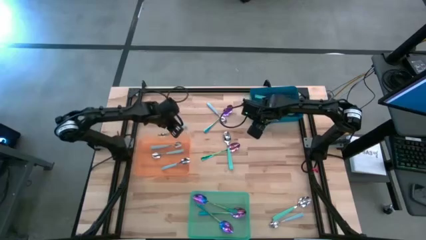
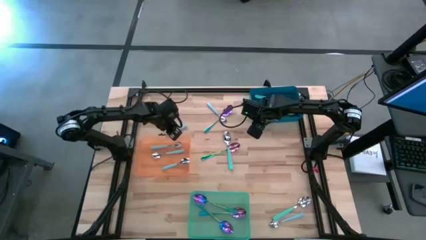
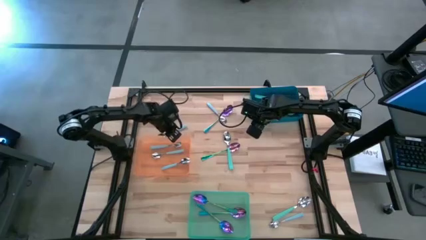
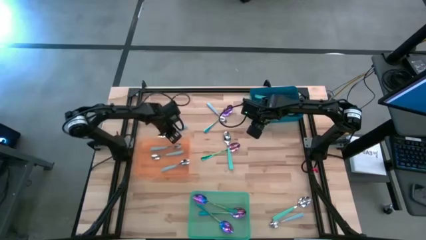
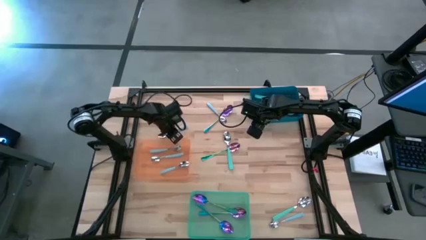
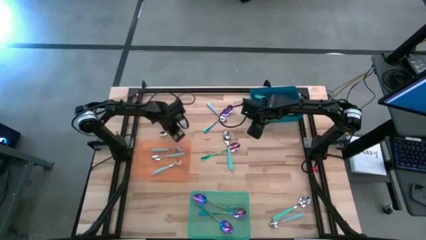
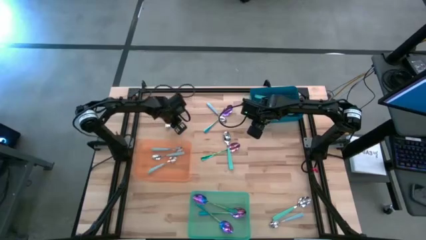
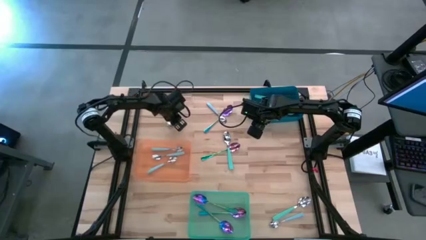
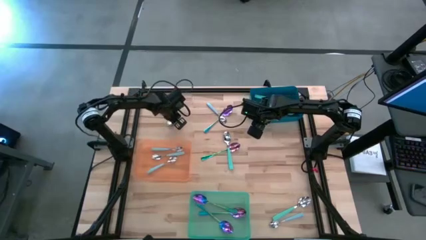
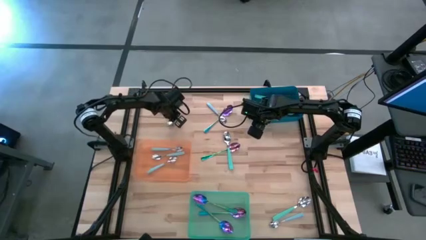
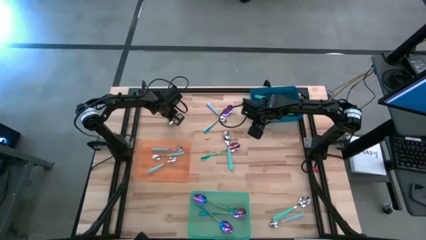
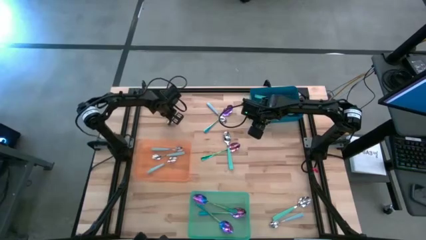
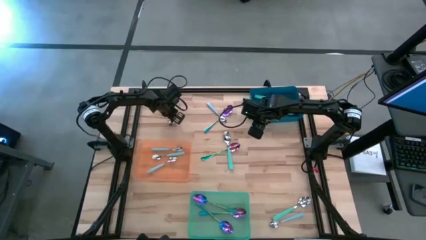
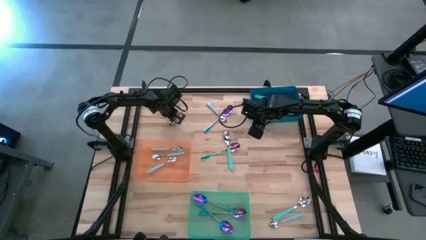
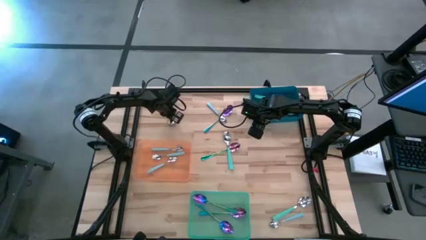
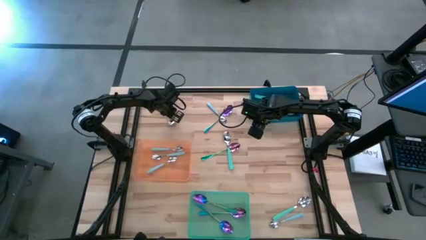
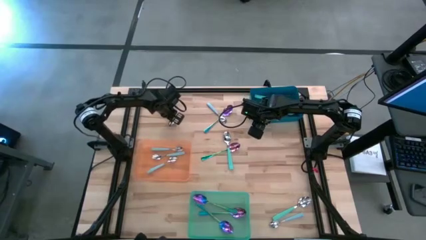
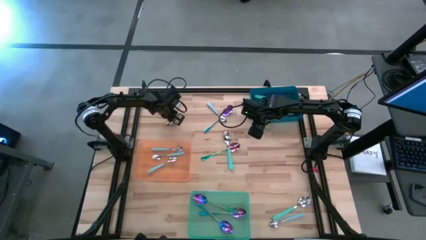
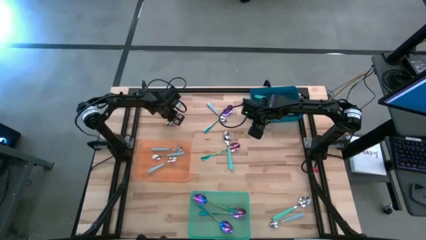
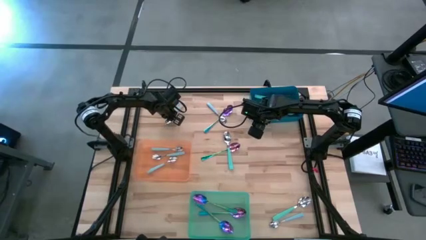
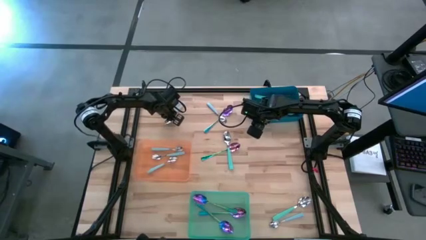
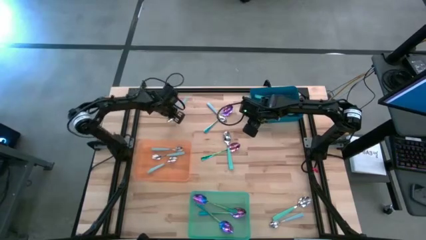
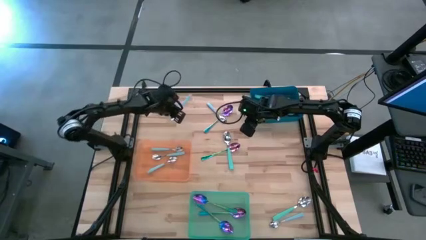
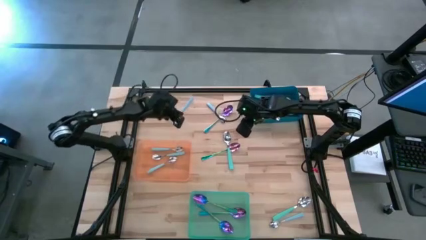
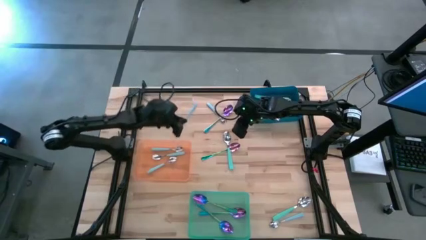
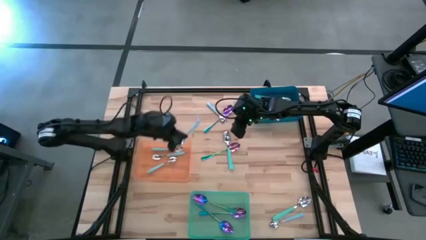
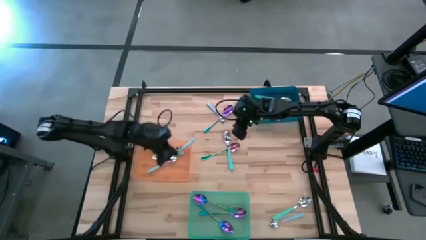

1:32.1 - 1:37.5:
Task: Sort silverware by color (type)
Put the top left blue spoon into the orange bin

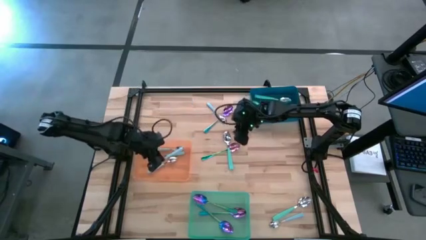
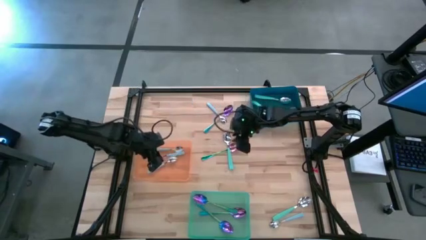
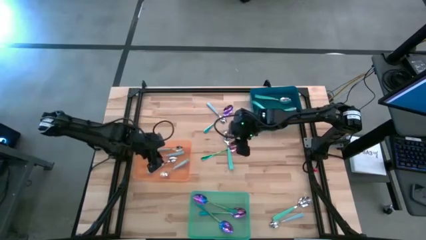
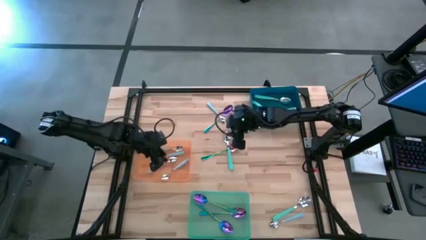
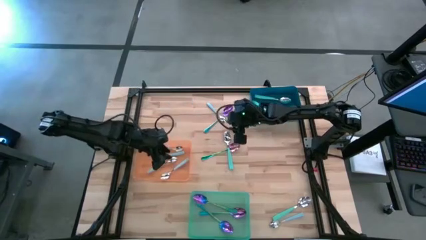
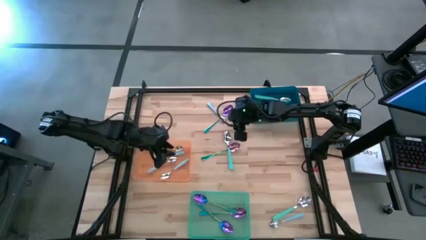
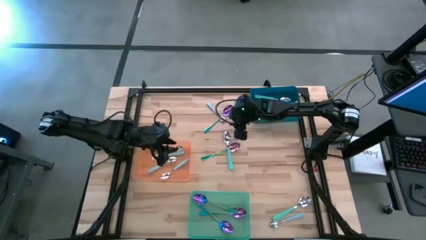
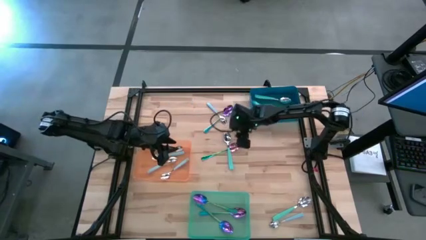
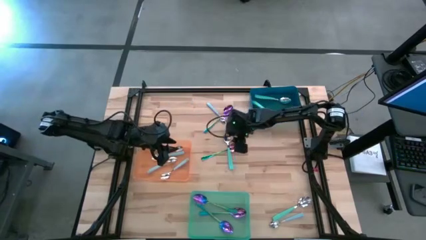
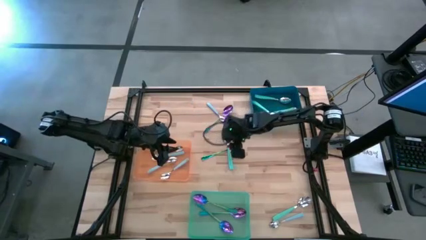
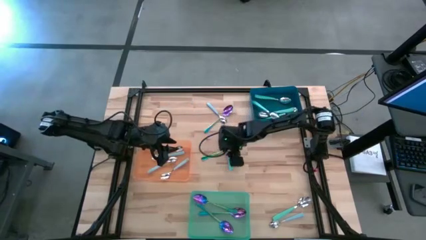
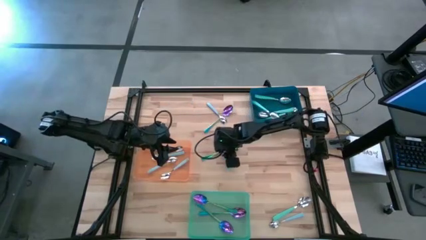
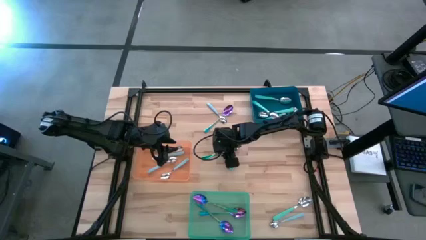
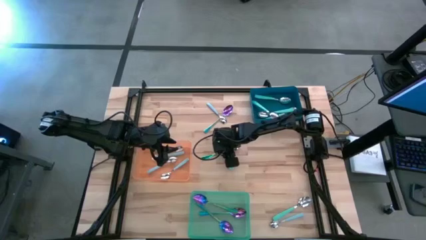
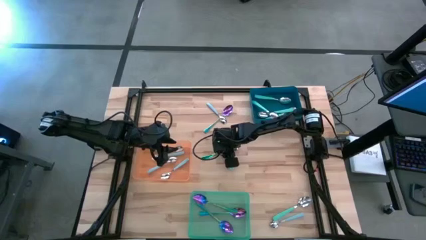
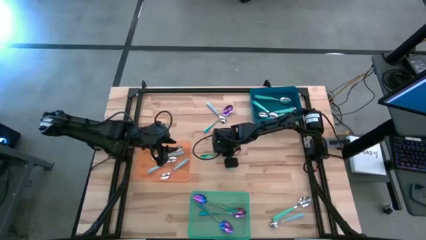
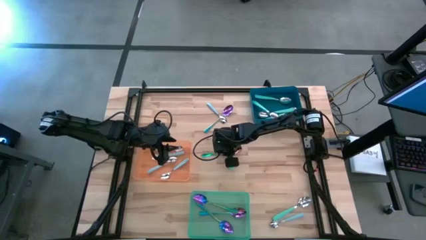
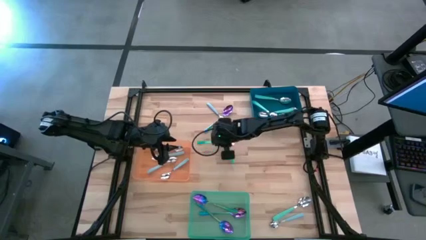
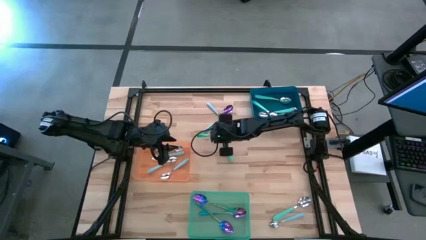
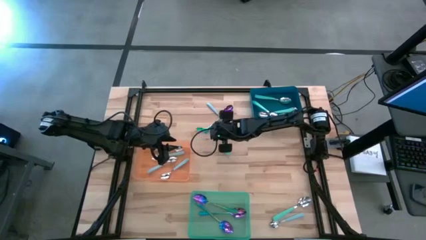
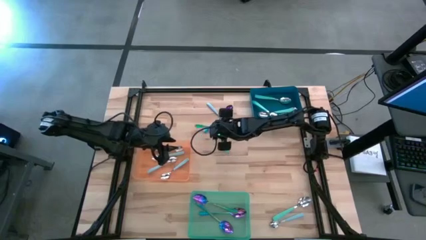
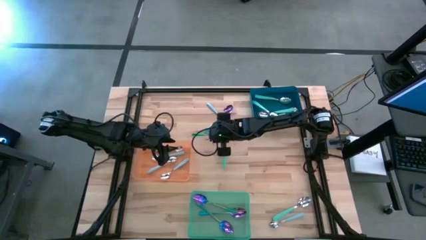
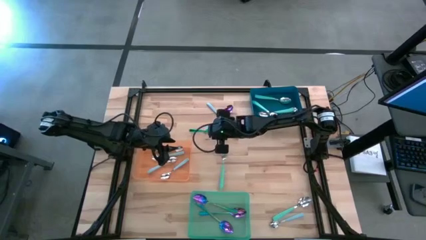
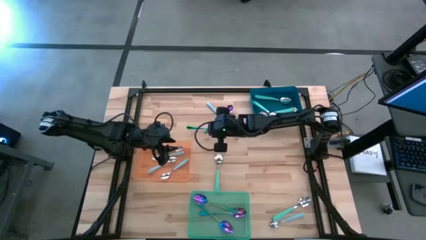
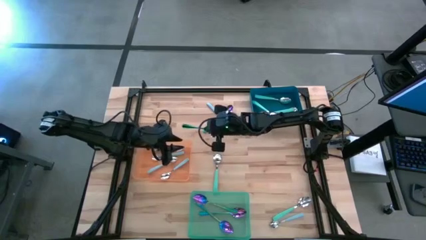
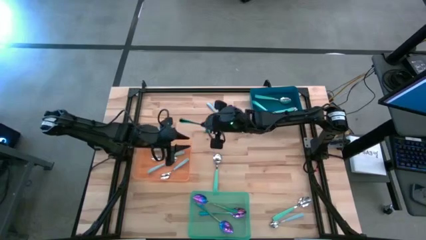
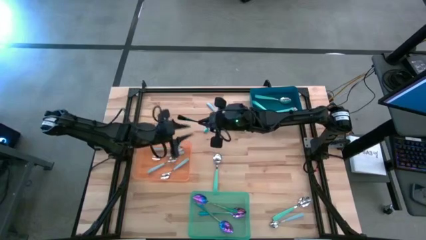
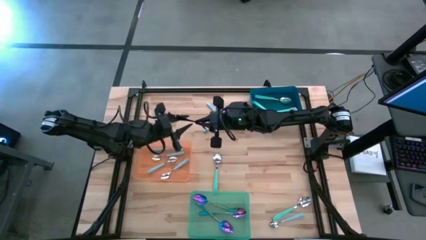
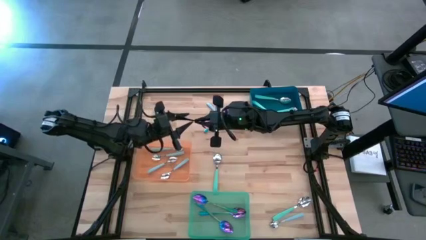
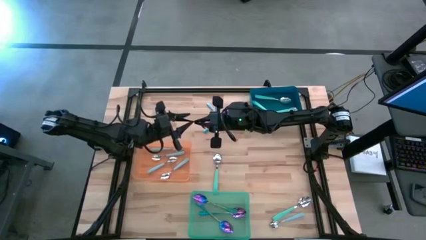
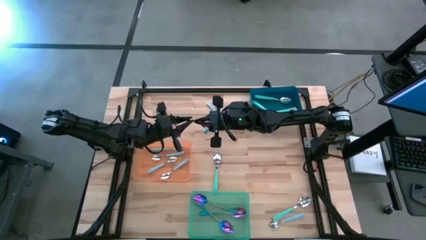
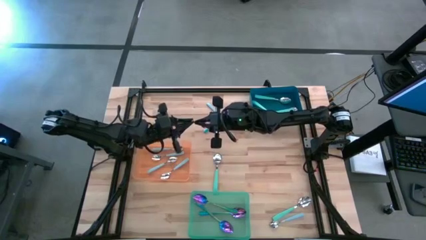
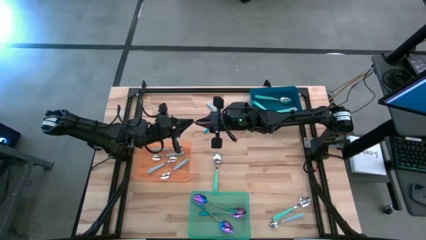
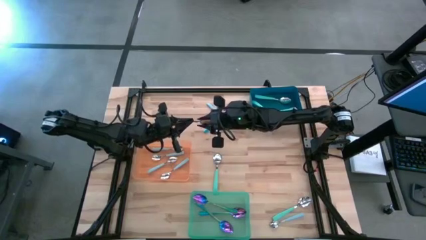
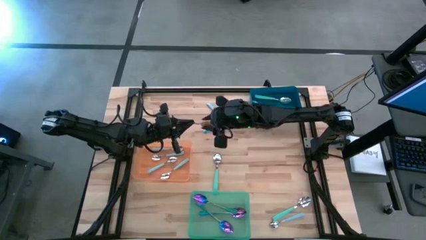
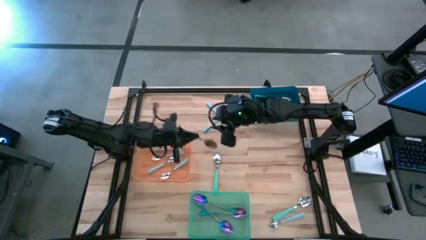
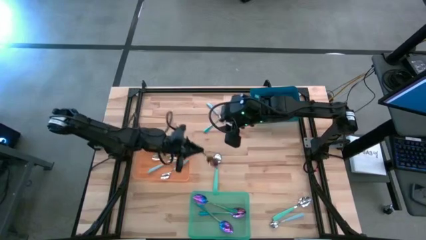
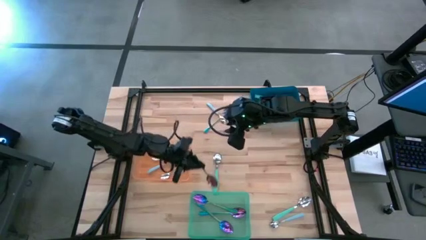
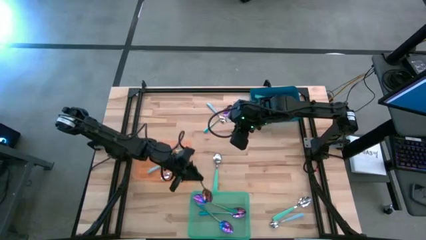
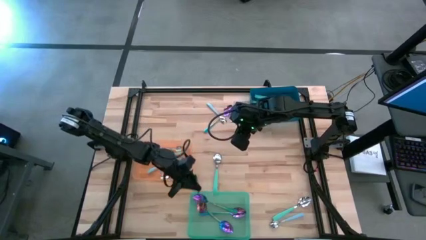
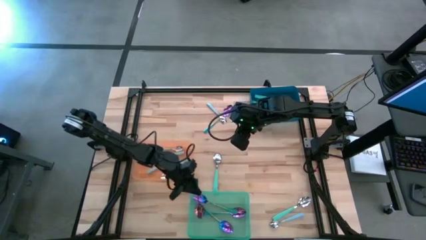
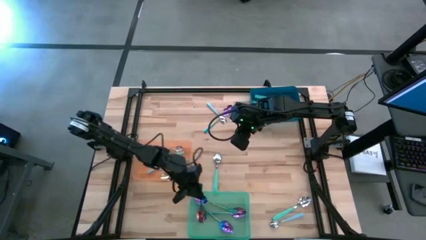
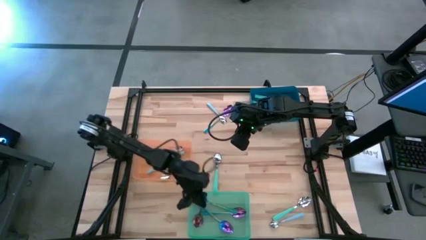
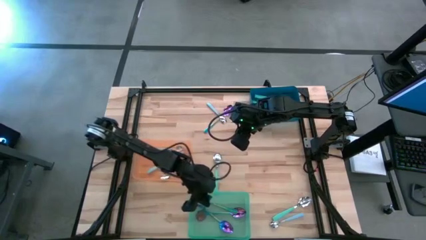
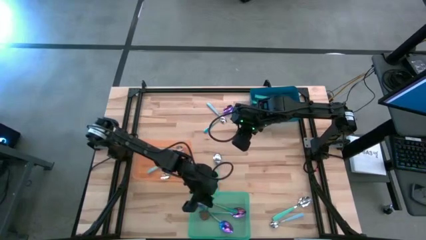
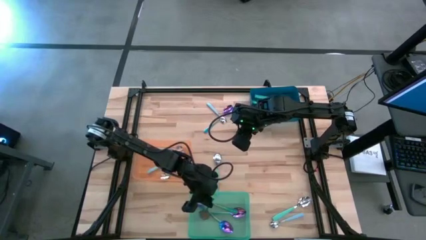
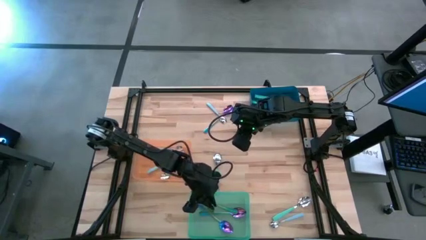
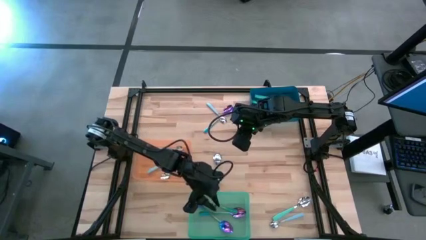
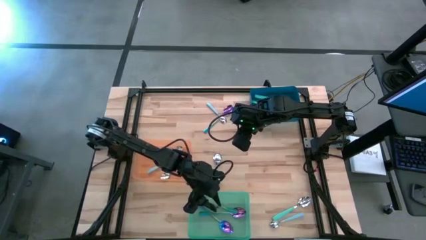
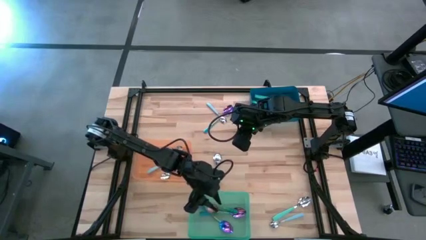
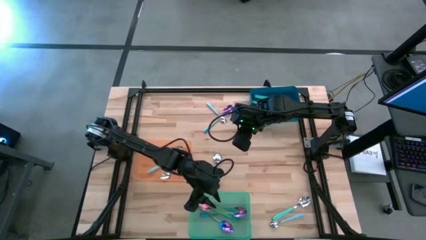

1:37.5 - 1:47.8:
Put the bottom purple spoon into the green bin

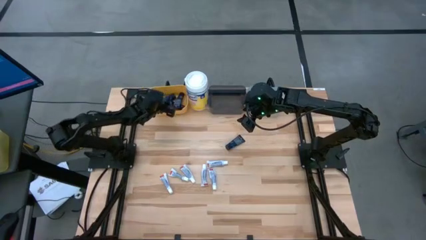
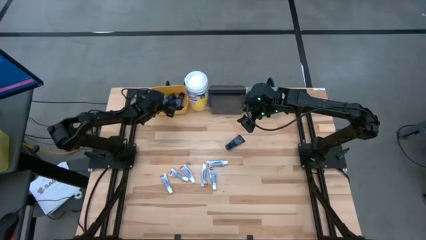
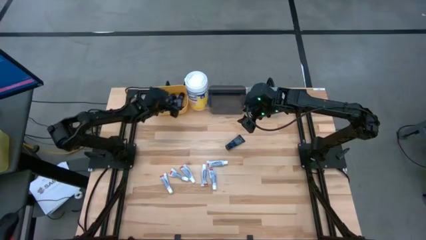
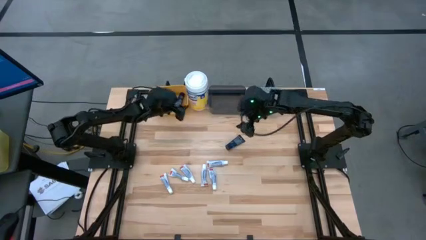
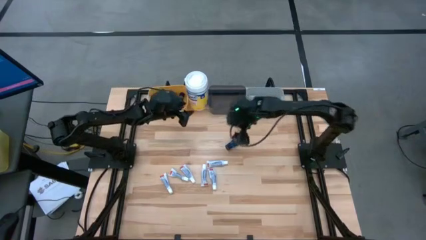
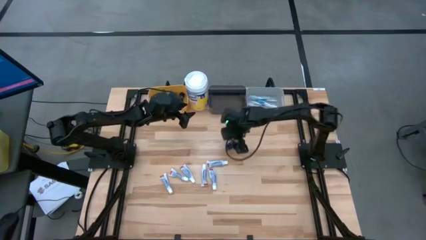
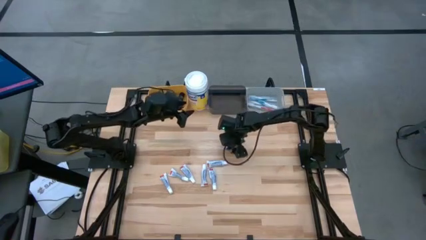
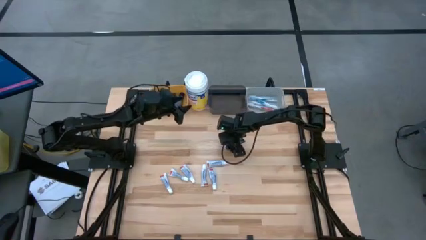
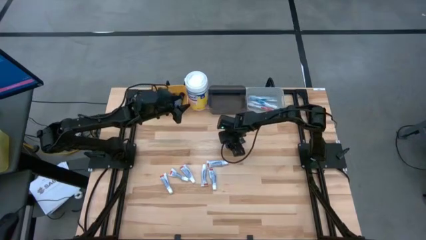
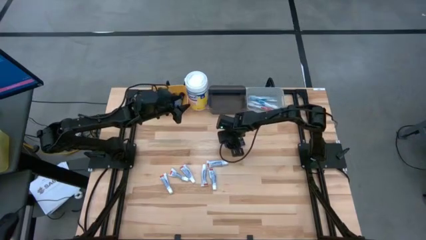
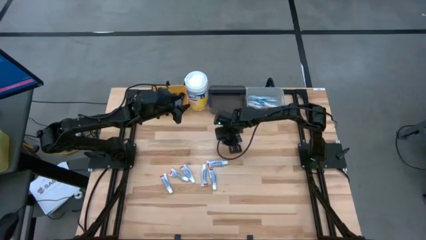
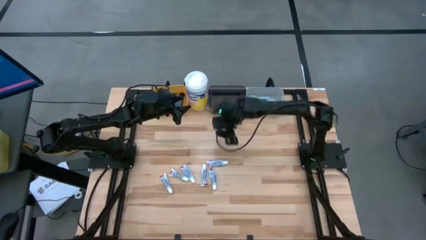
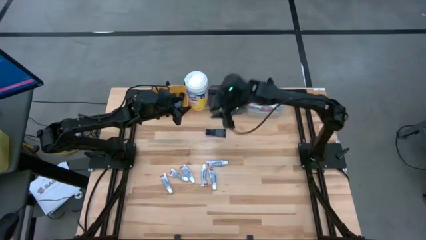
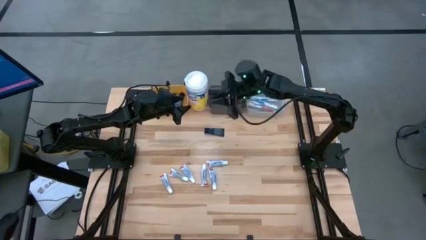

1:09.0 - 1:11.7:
Task: Pick & Place Travel size toiletries
Put the blue shave cream into the yellow bin
